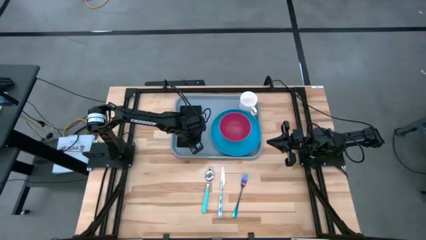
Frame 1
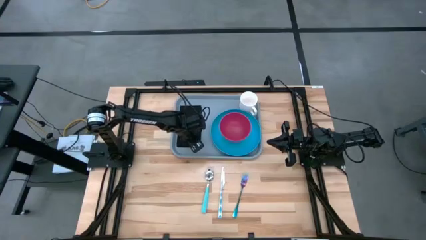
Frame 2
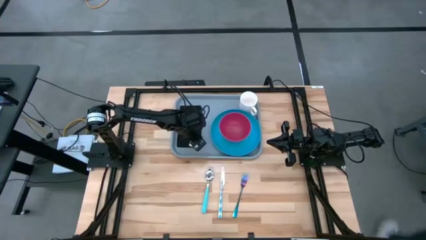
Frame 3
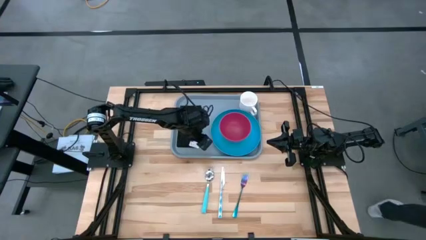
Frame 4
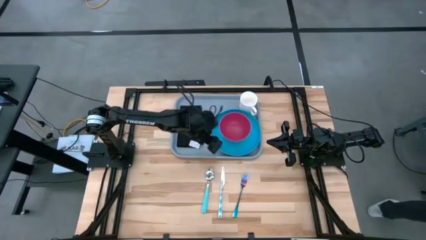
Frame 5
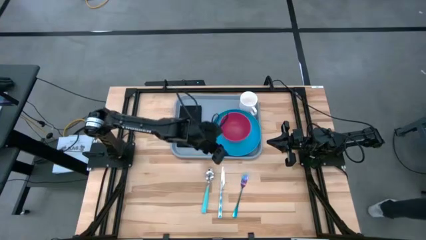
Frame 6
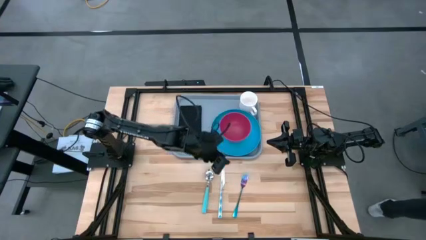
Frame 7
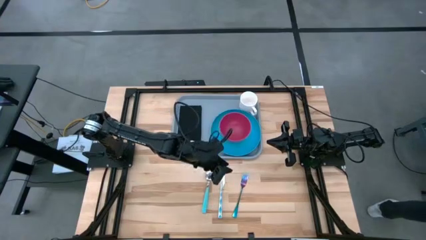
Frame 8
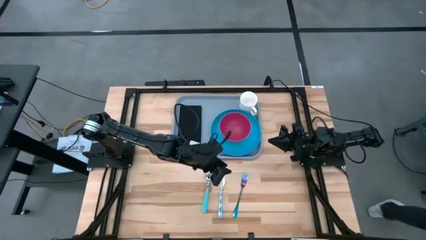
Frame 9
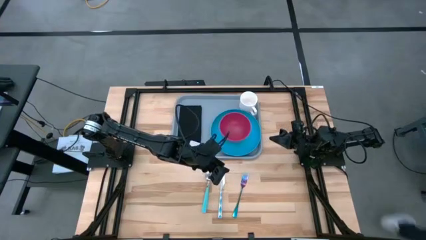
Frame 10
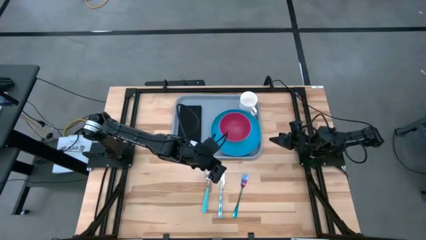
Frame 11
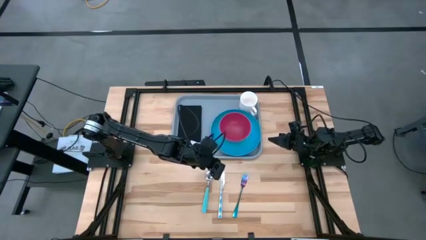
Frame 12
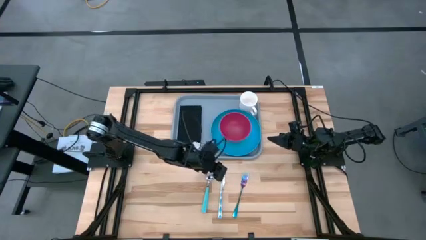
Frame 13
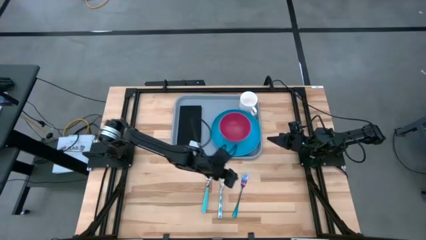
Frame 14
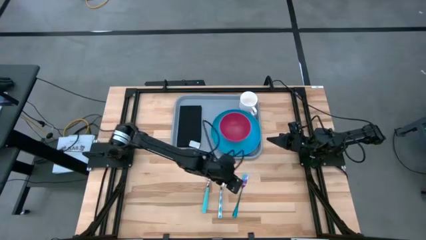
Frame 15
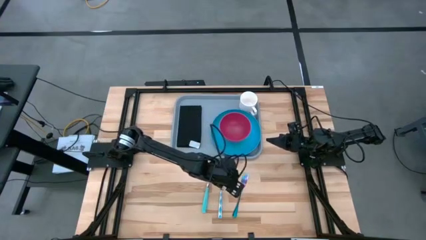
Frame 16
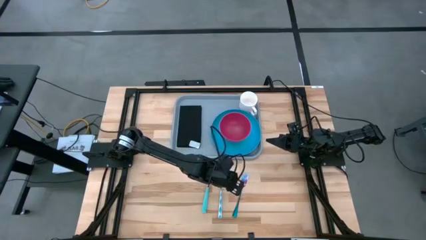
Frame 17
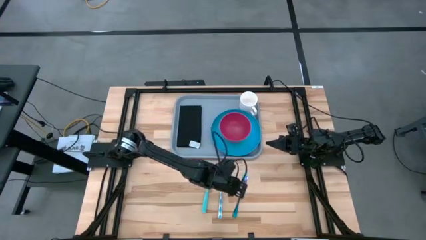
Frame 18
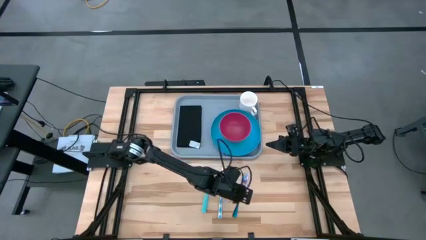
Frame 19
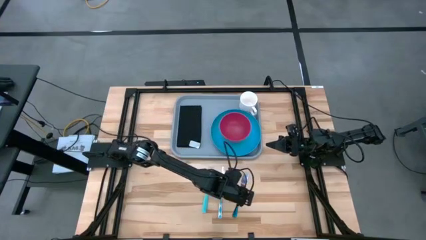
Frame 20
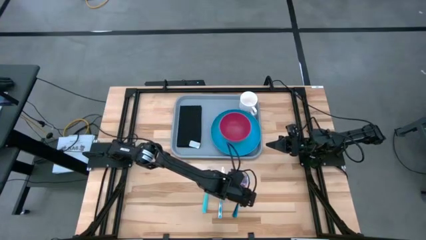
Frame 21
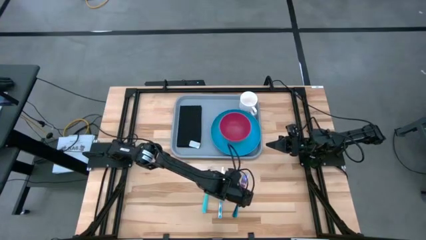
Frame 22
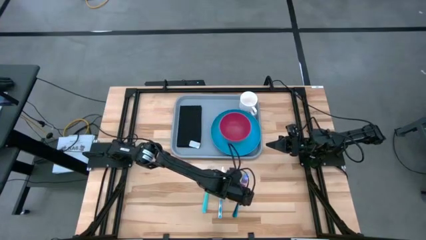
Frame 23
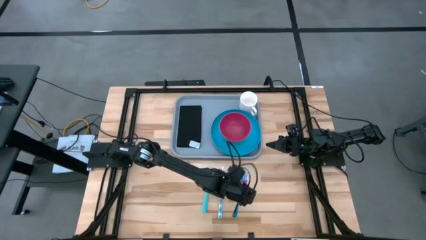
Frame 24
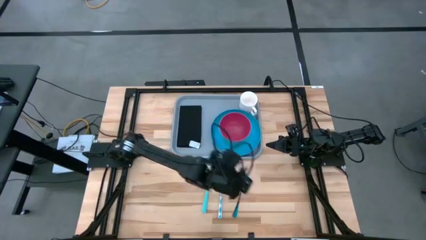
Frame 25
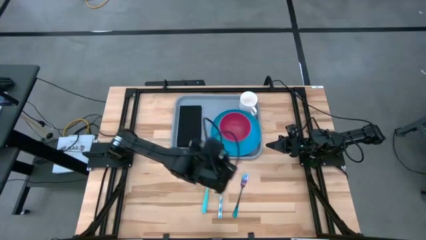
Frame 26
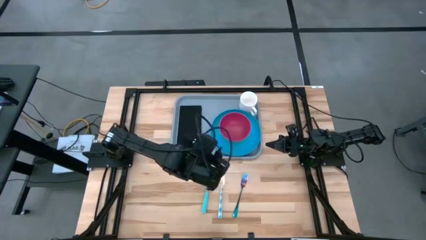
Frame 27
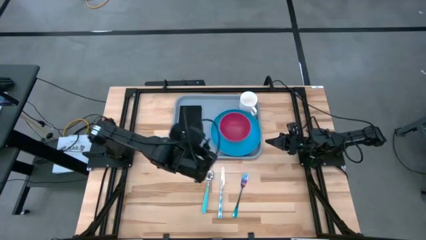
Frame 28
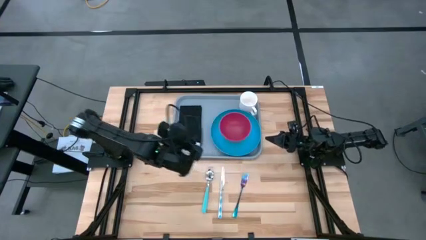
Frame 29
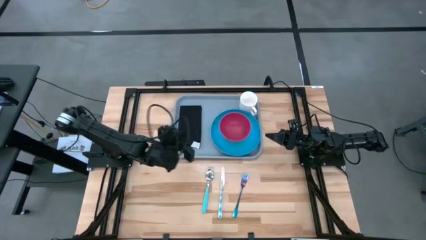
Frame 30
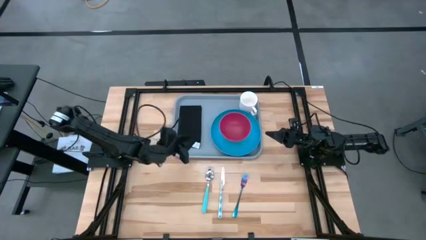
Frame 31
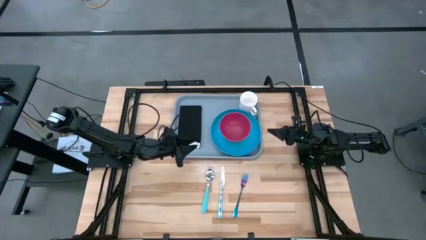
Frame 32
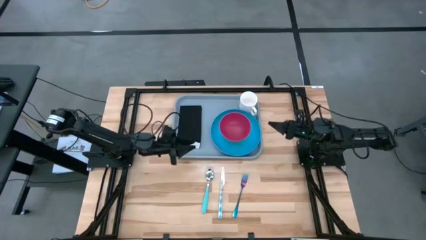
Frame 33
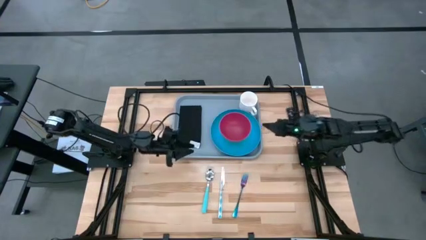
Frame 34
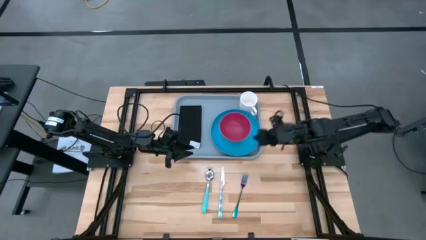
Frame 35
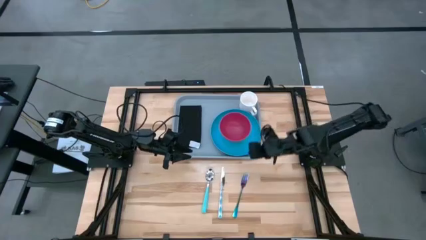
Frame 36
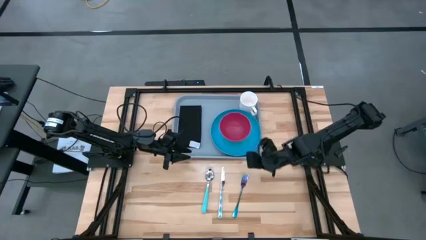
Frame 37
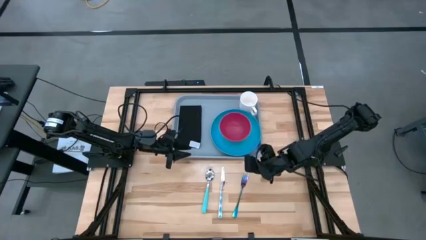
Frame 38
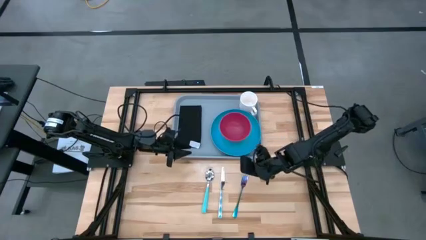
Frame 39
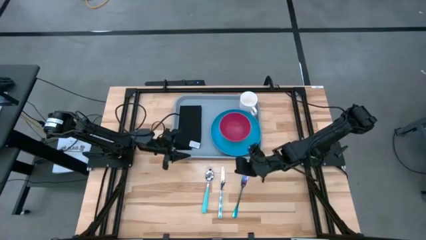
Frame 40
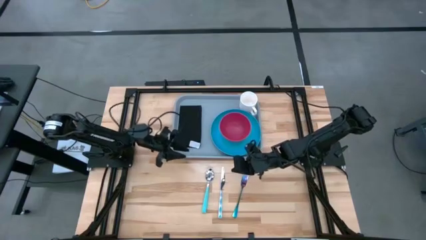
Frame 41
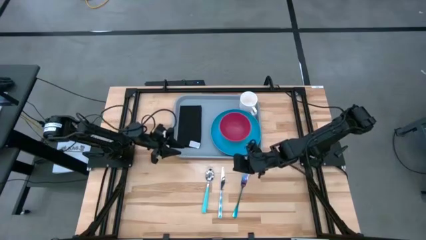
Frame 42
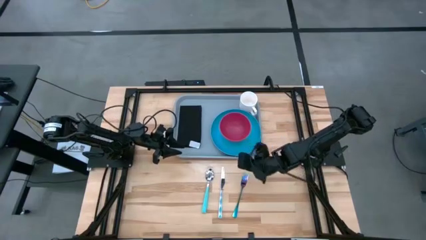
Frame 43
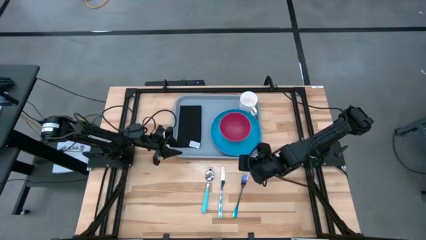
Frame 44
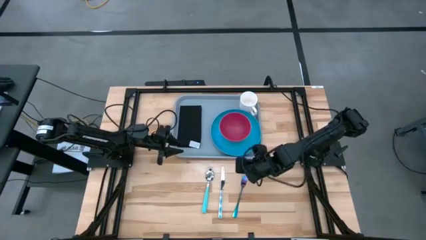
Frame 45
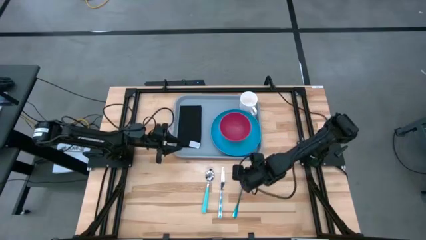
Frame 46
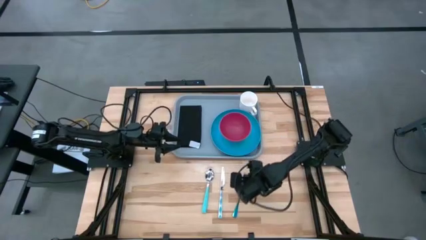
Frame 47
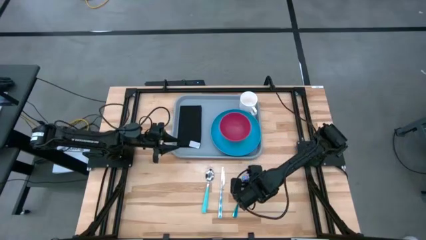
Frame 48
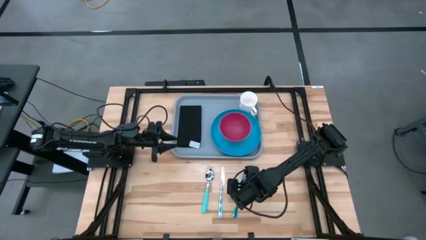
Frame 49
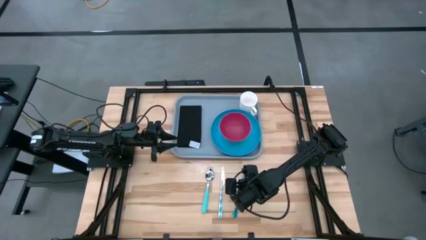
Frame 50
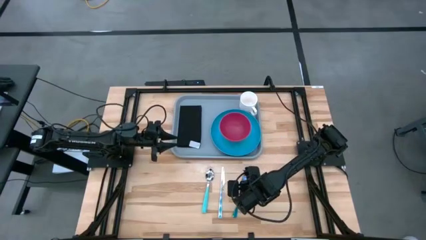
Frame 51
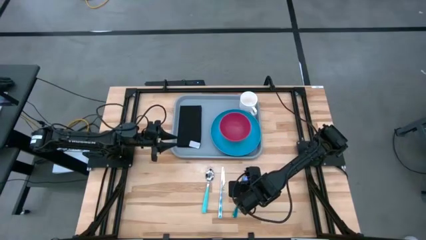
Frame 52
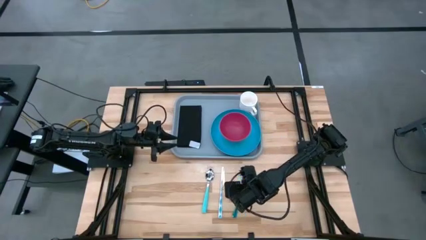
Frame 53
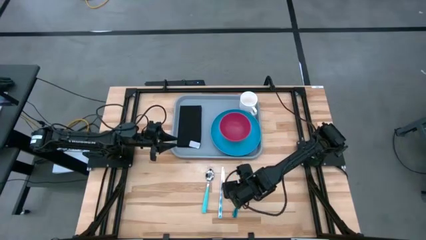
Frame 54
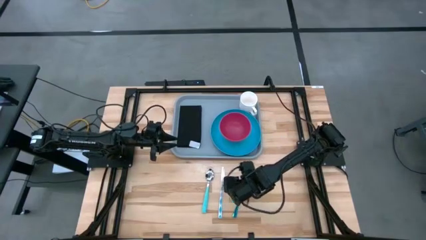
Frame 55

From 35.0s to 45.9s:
Task: Set up tray
Put the blue fork on top of the black napkin

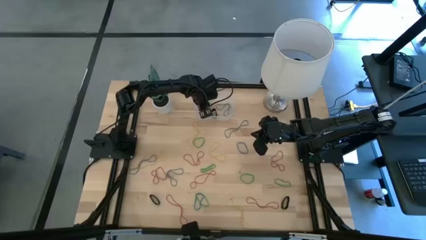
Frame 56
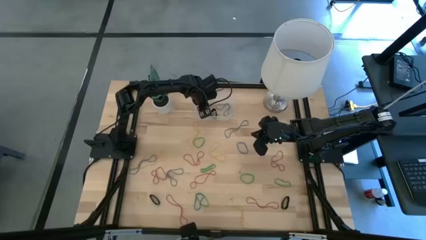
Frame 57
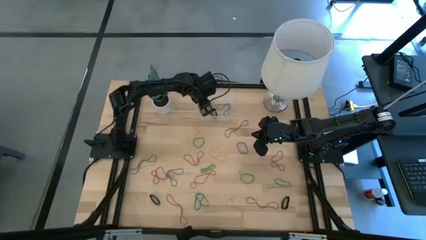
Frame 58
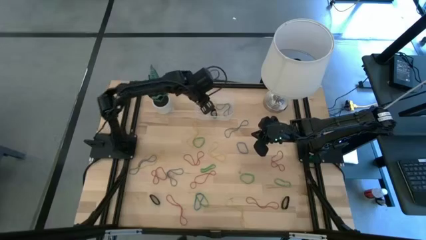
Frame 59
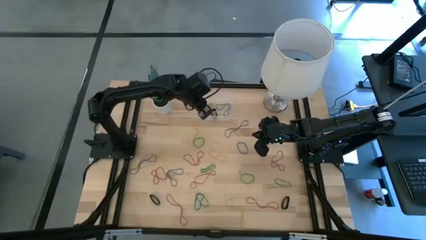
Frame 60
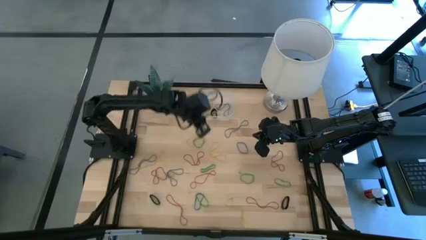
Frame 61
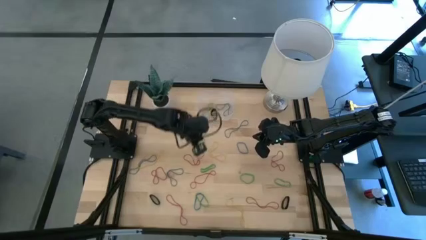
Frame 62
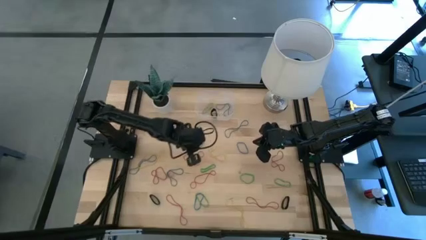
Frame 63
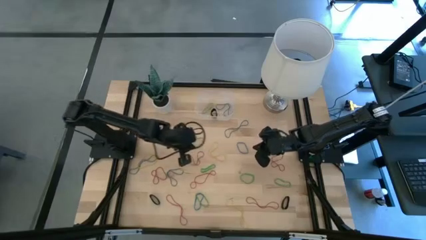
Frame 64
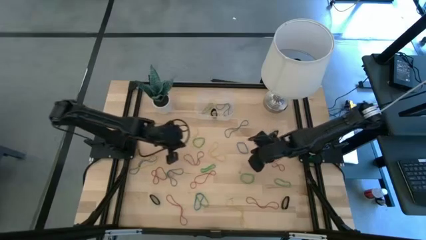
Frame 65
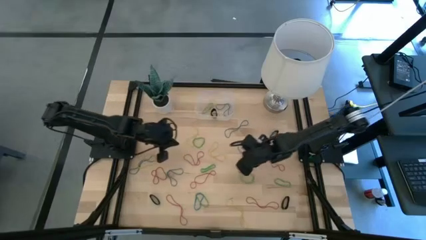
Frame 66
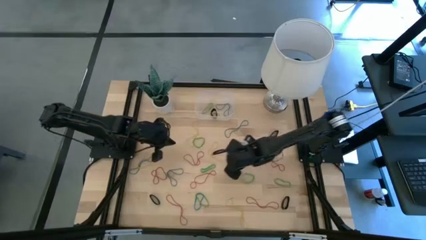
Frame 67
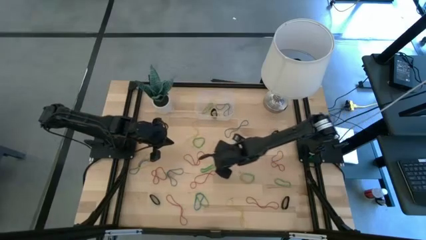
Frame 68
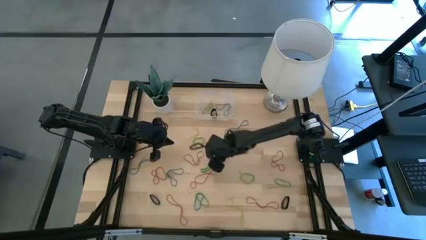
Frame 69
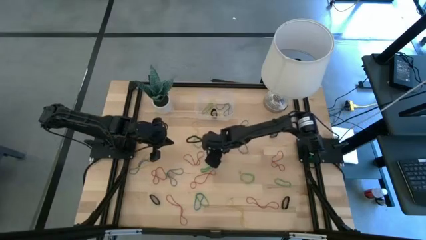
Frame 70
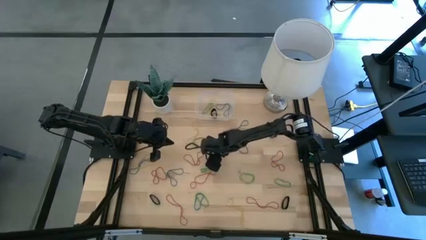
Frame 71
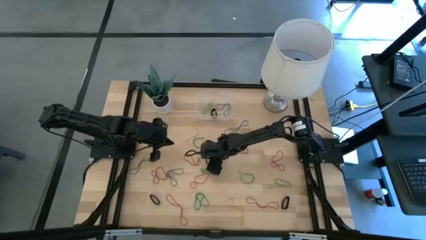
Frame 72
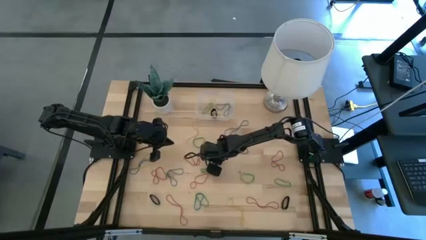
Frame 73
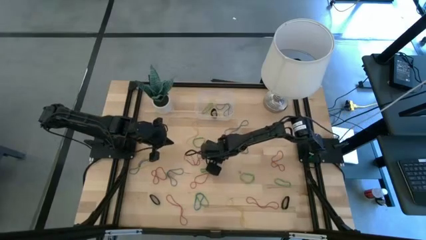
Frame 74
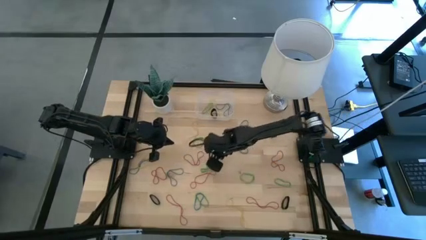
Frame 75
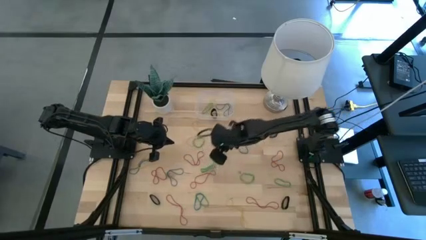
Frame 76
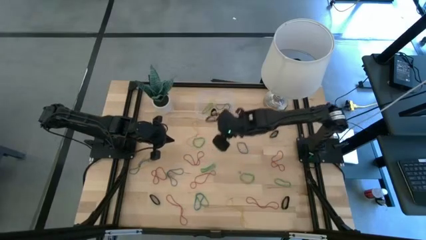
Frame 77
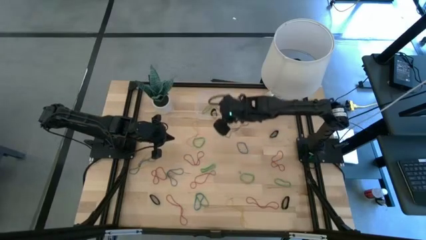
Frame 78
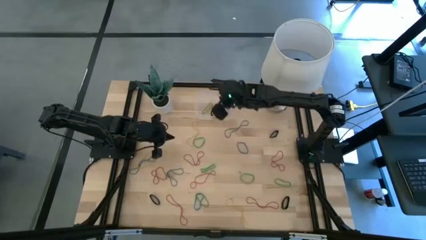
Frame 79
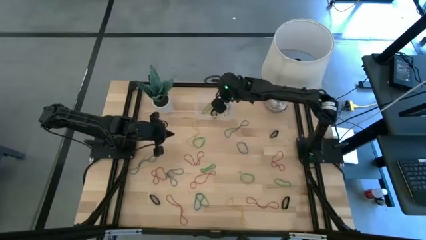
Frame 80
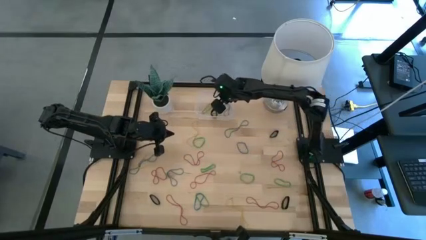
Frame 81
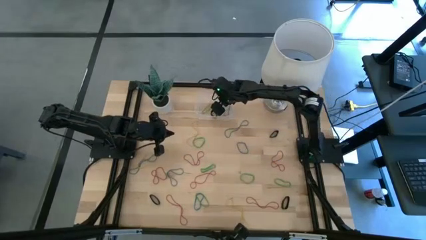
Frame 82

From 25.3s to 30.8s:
Task: Pick and place rubber bands into bin
Put the yellow rubber band into the transparent bin
